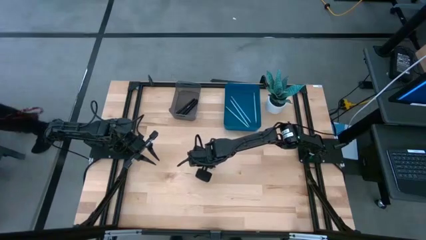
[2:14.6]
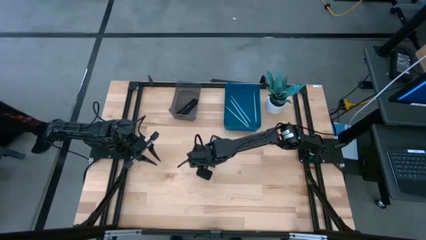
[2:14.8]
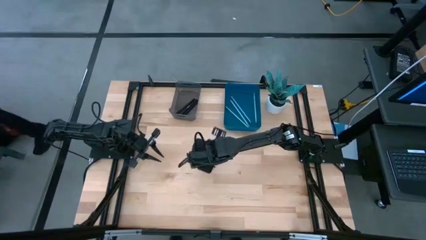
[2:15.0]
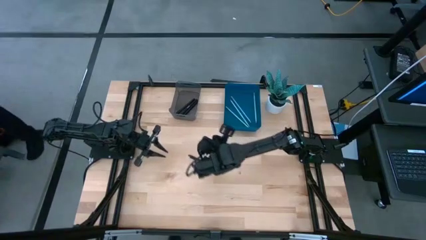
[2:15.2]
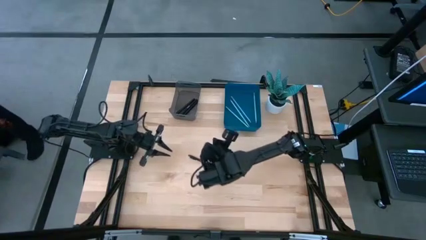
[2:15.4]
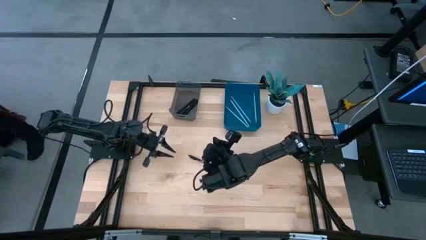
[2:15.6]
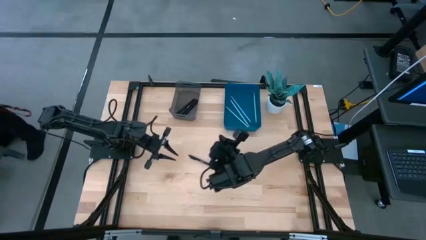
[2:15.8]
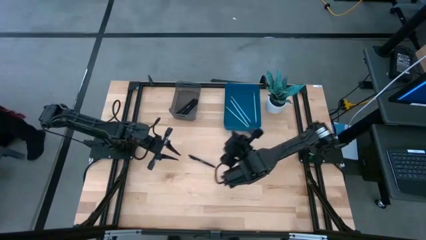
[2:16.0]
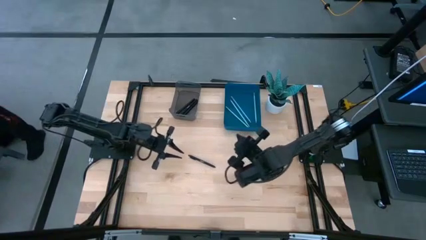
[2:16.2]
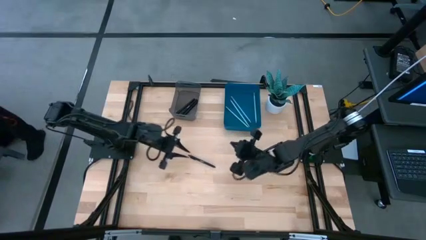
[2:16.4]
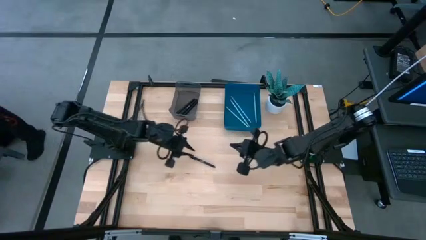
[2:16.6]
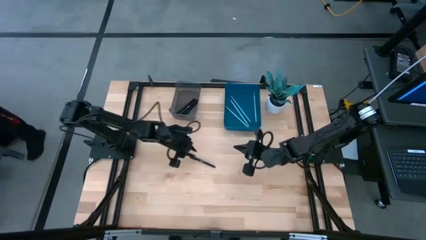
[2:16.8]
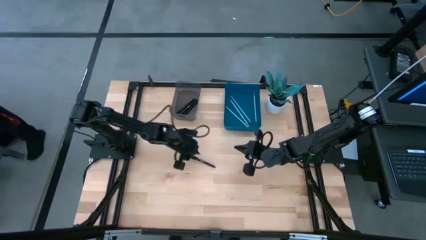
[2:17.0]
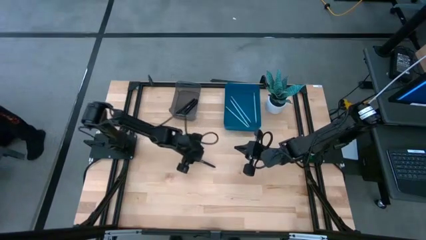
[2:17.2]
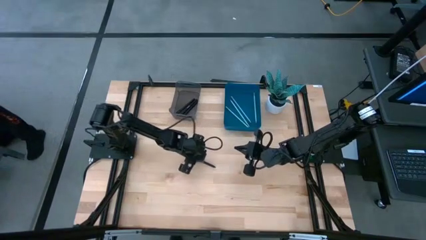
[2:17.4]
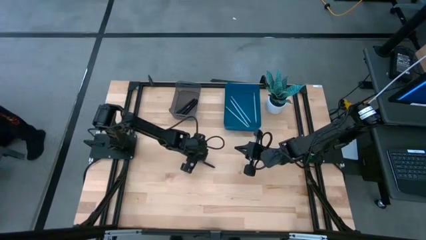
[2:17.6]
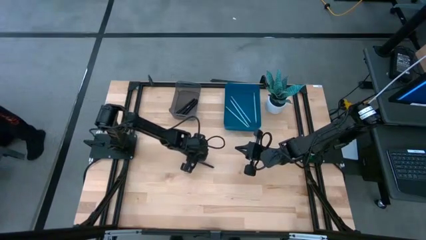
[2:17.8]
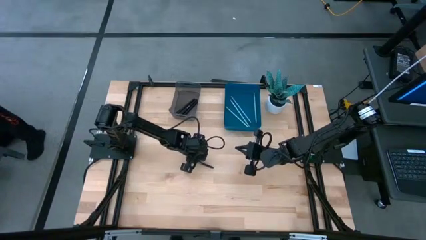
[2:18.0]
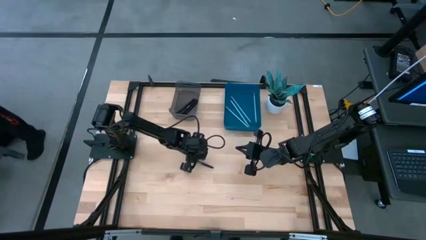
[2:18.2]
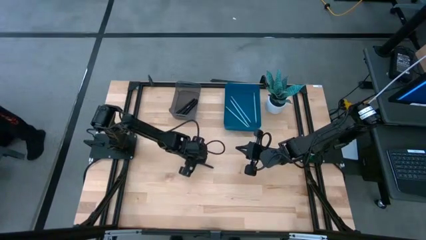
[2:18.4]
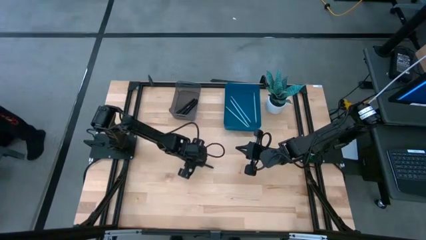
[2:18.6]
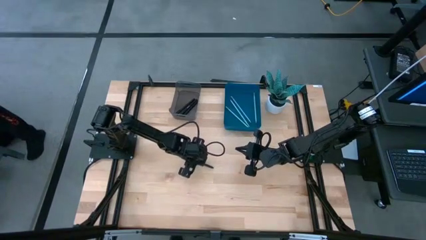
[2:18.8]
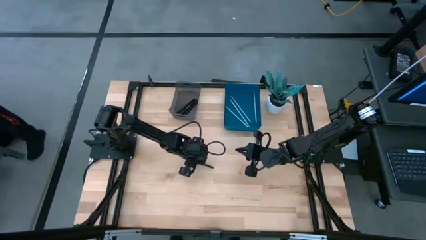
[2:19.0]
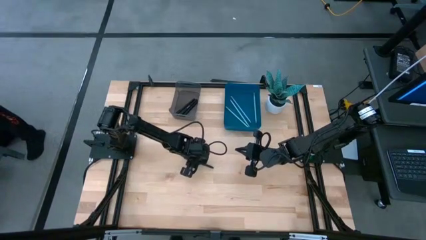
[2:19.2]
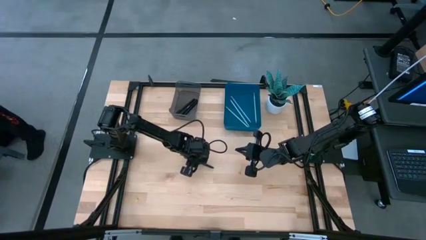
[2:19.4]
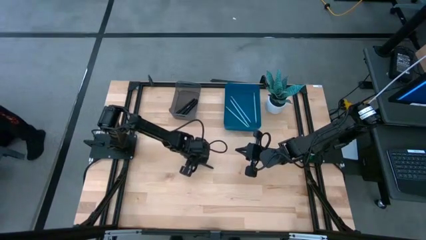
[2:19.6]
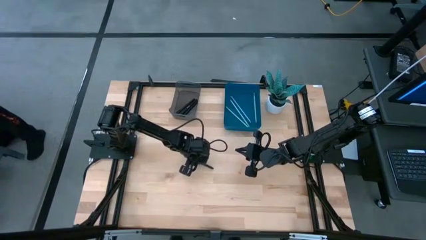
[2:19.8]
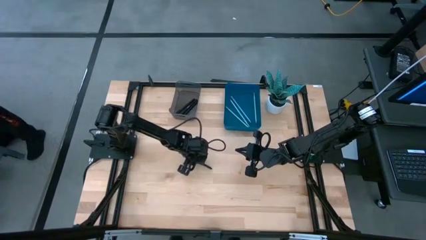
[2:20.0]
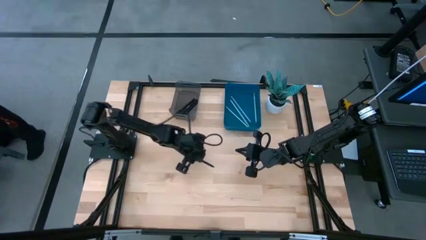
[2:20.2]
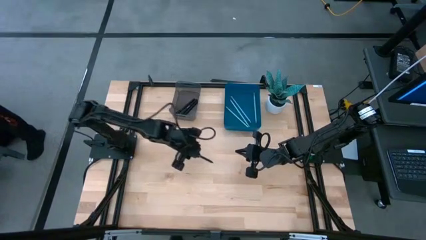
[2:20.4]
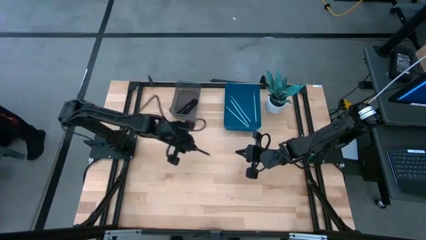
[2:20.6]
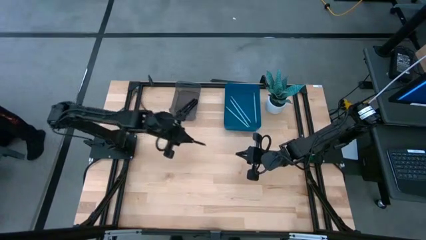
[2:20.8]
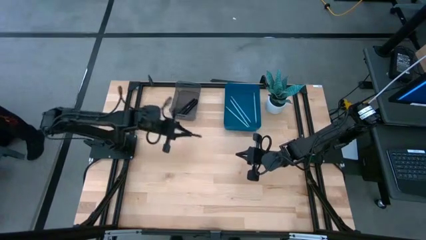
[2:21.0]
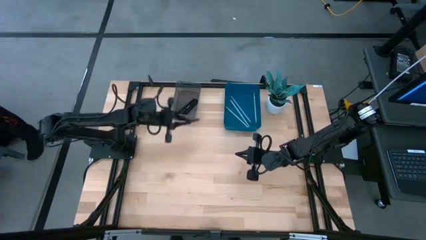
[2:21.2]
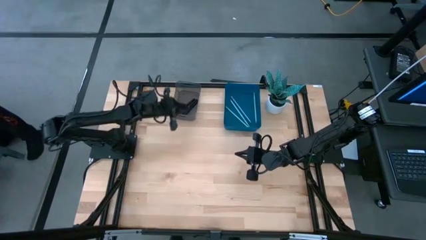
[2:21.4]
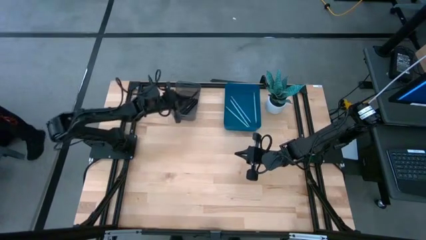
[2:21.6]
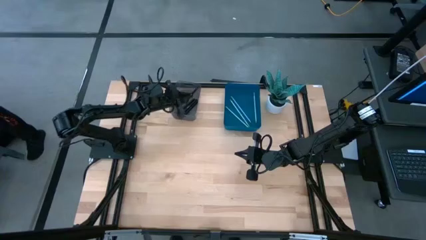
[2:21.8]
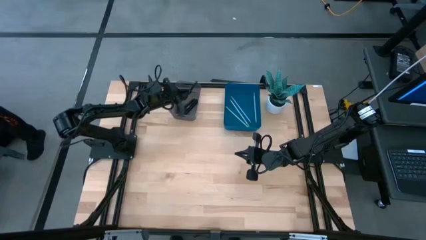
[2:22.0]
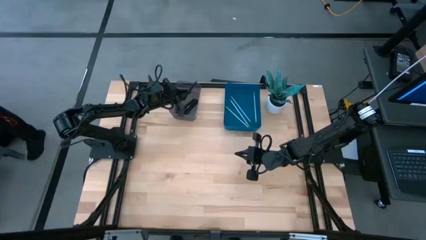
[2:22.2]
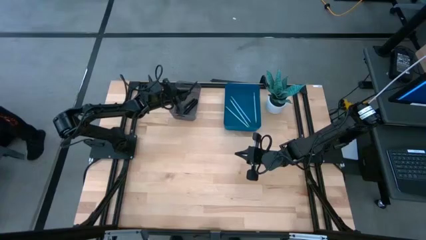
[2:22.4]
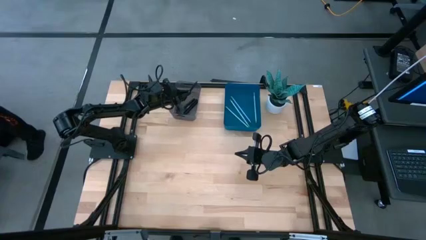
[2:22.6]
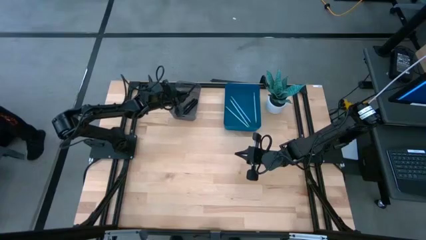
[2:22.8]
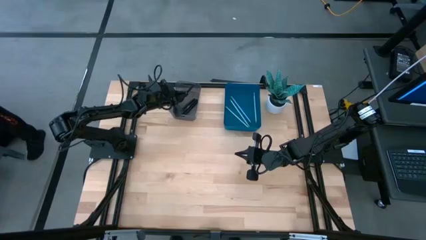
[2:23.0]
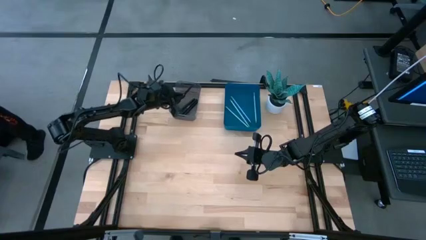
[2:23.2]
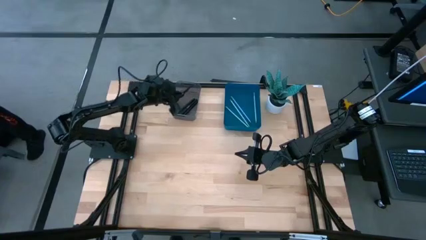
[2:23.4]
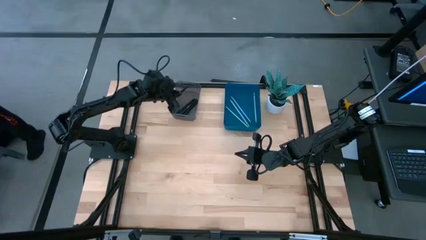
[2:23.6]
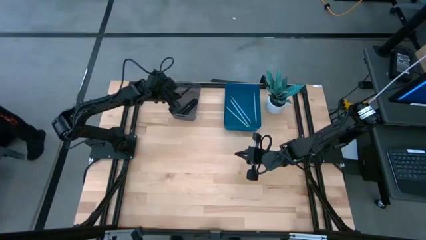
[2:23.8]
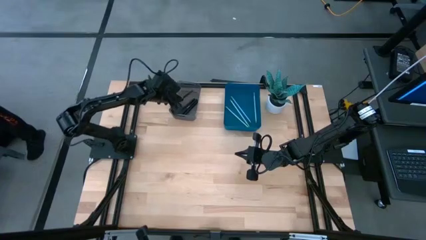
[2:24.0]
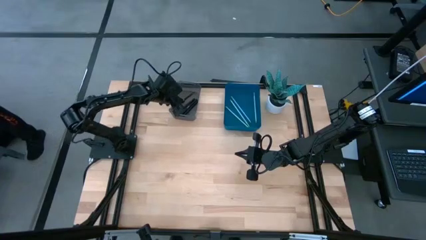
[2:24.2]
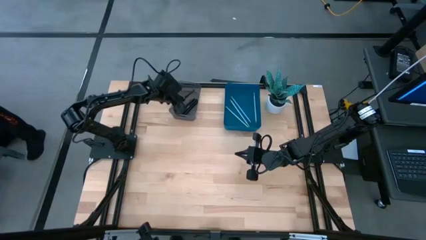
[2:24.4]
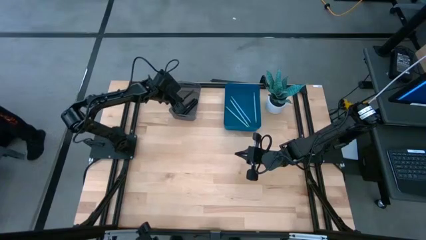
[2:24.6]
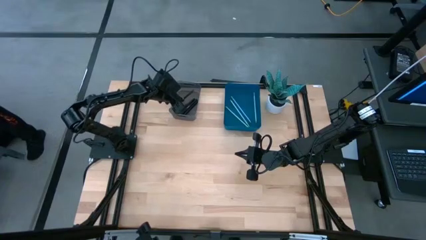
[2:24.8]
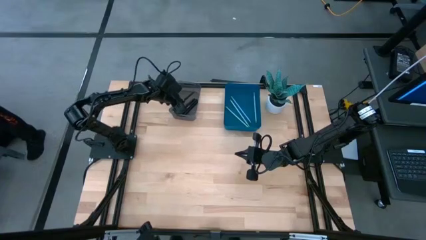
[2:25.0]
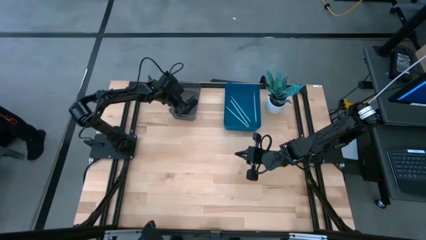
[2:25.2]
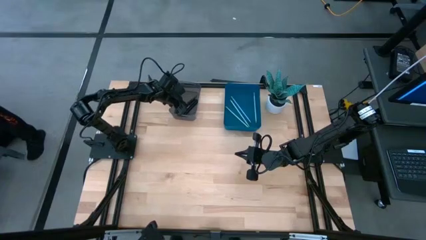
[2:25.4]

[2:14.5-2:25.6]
Task: Sort pens & pencils
Put the black pen into the black bin

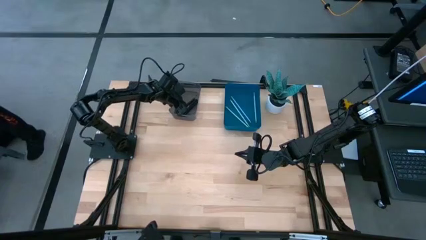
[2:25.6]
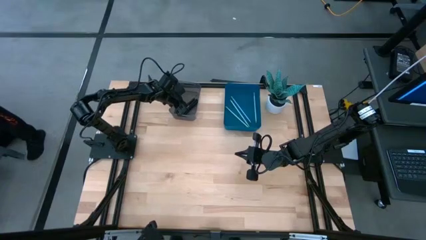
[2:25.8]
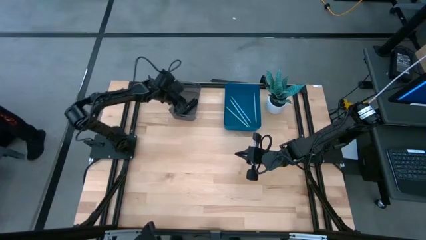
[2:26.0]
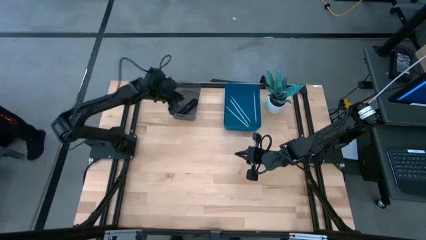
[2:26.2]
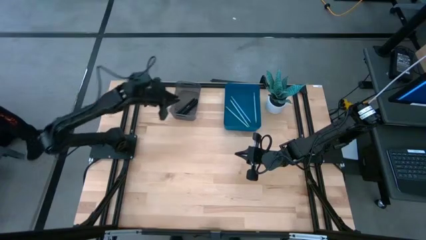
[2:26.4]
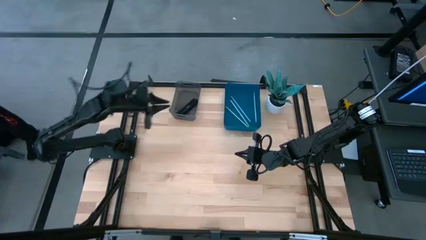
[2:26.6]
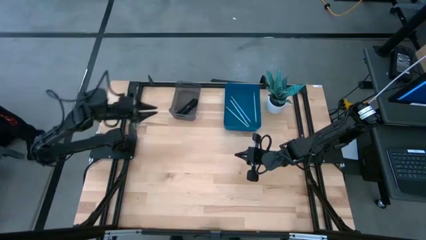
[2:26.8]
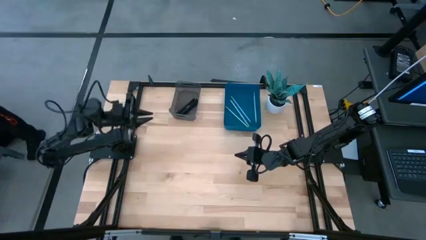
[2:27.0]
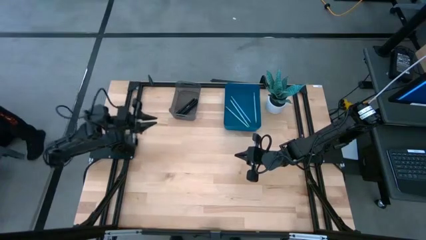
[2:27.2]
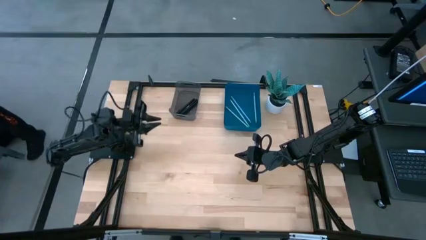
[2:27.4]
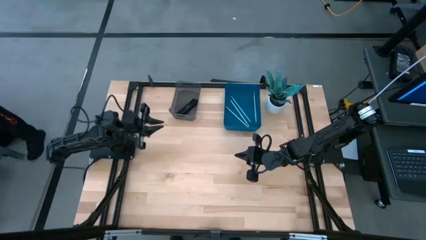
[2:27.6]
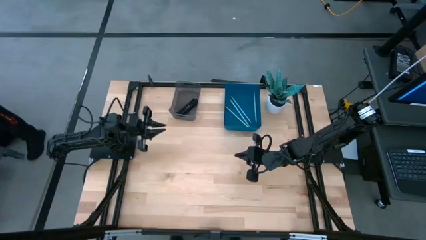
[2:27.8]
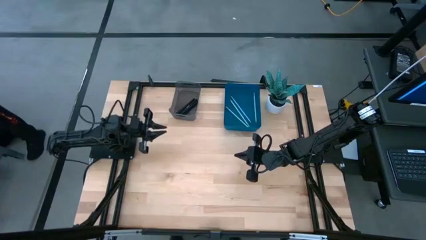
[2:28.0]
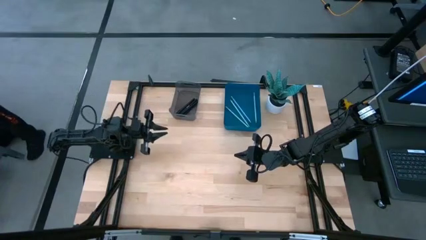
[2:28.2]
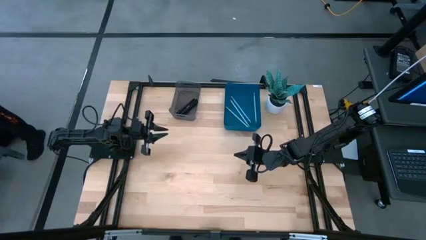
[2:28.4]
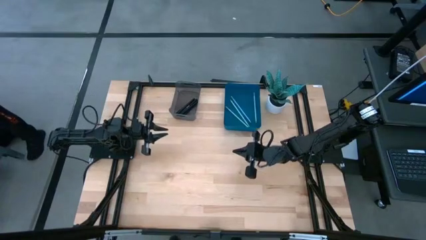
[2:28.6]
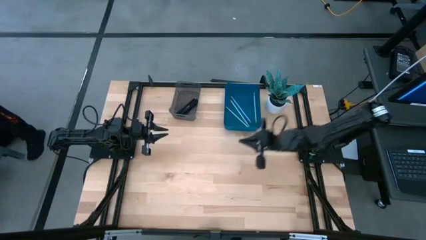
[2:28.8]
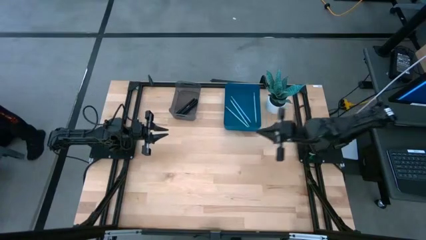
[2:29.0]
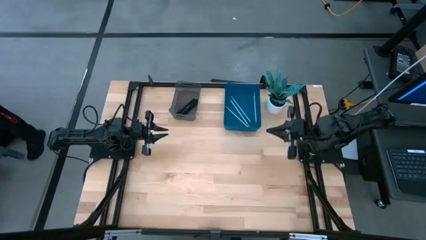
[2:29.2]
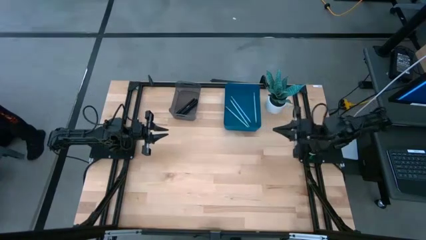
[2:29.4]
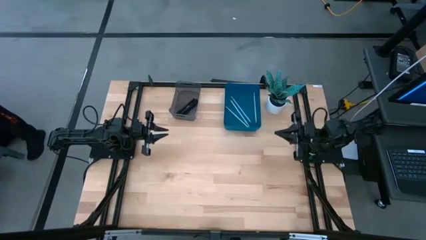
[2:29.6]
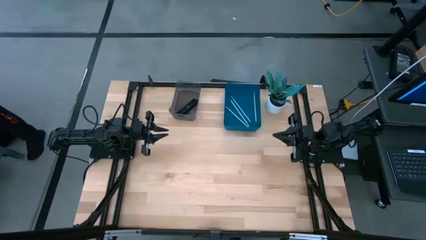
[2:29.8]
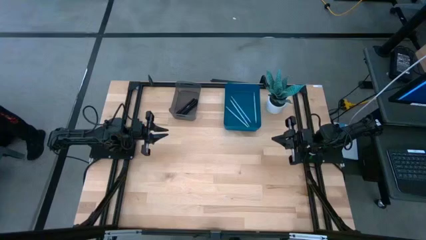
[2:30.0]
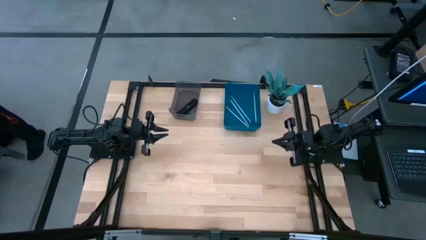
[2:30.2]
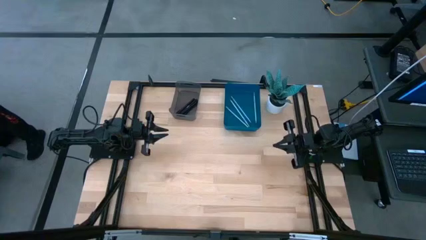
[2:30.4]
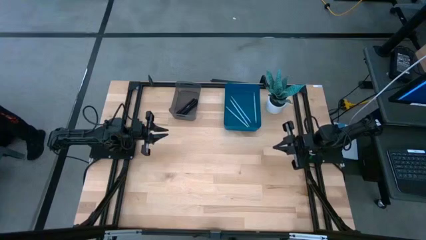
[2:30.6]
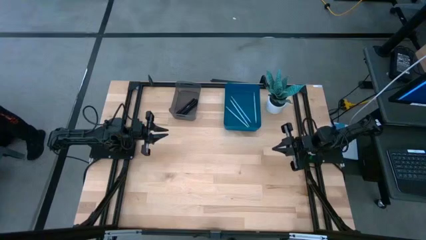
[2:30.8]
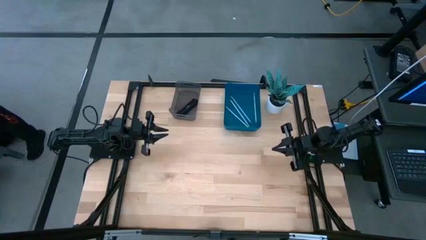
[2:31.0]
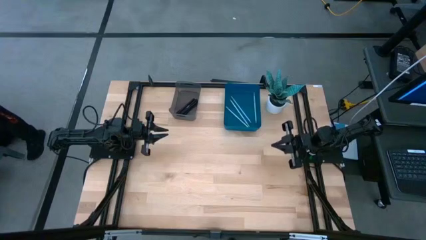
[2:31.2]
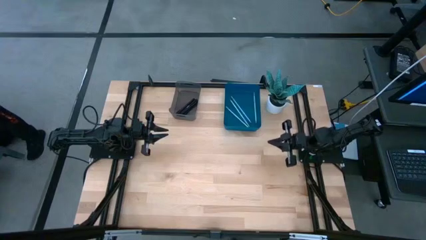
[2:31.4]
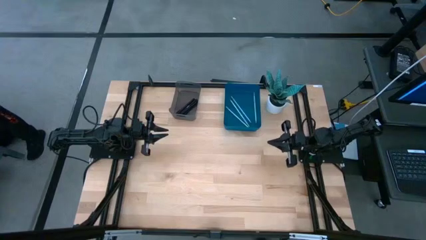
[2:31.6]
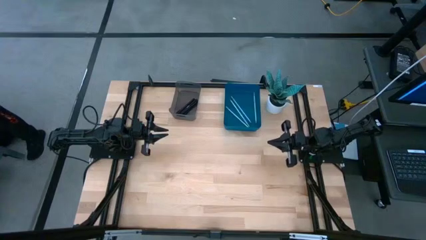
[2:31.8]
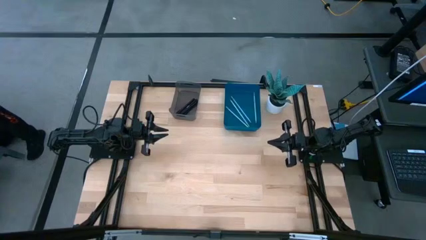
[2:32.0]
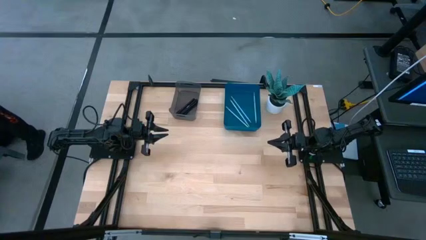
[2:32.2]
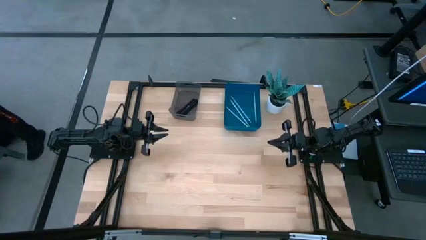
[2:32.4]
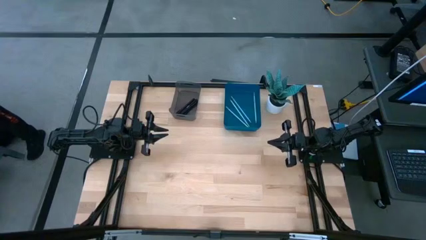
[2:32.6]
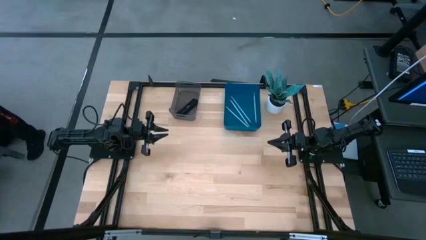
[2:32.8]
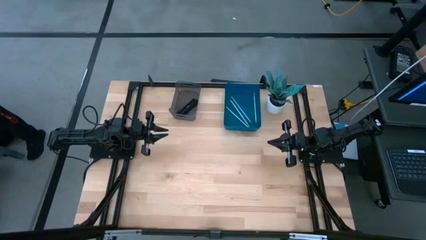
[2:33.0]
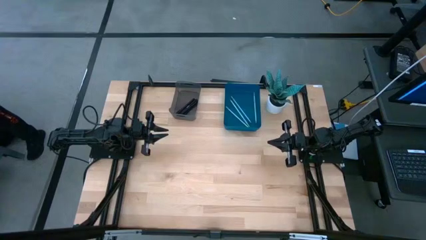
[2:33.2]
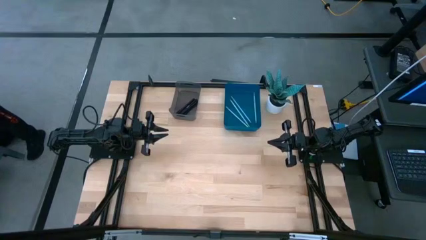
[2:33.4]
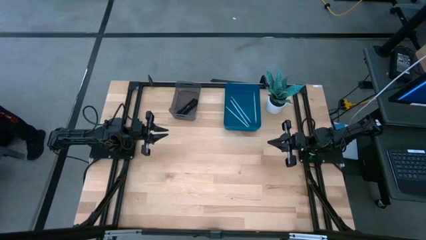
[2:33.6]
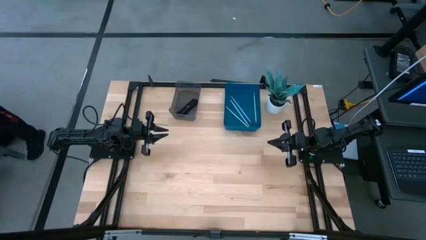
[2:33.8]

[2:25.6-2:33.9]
Return to Home Position
